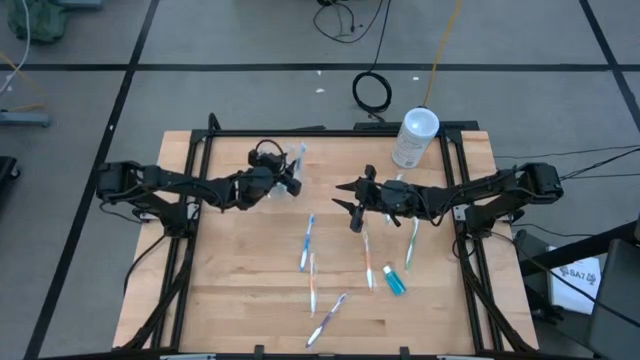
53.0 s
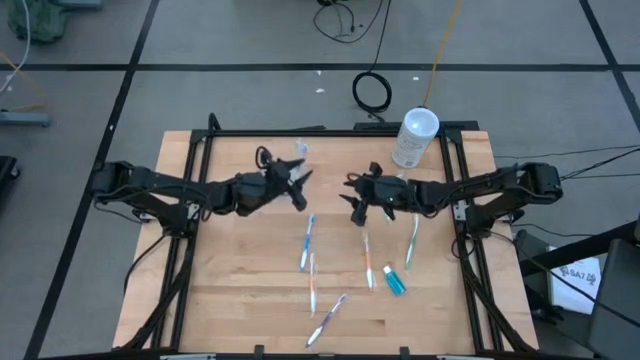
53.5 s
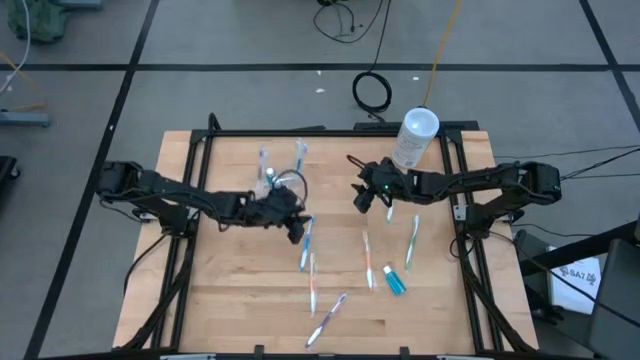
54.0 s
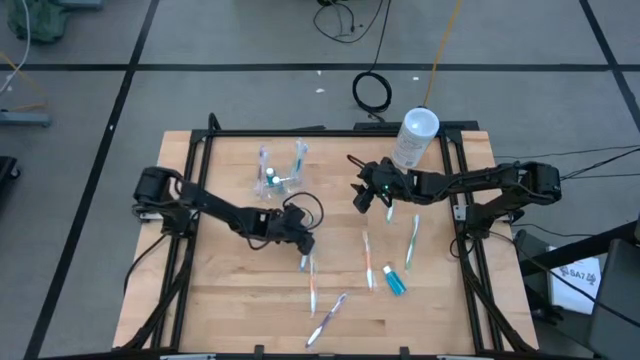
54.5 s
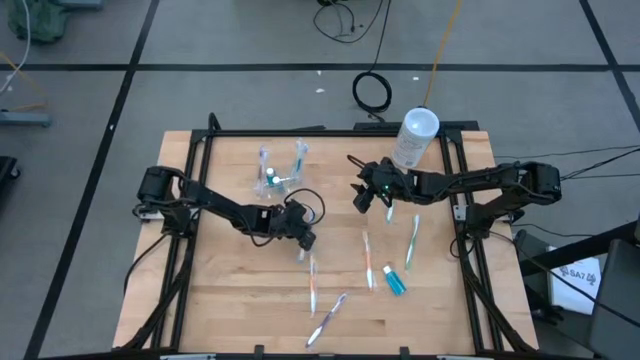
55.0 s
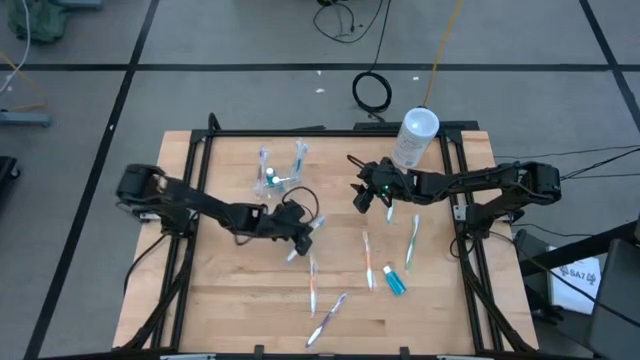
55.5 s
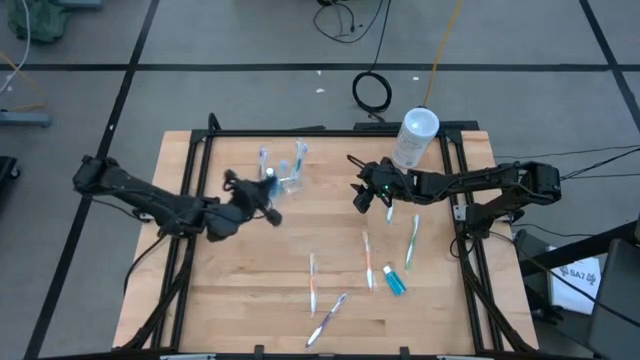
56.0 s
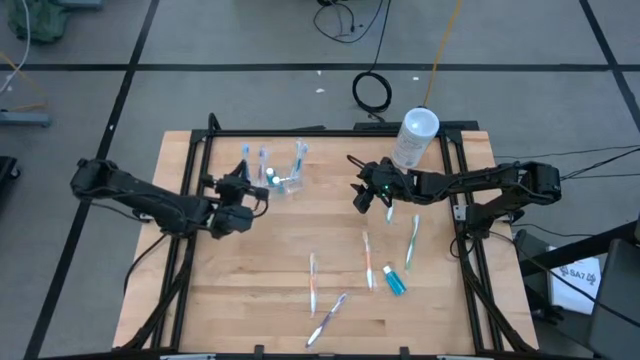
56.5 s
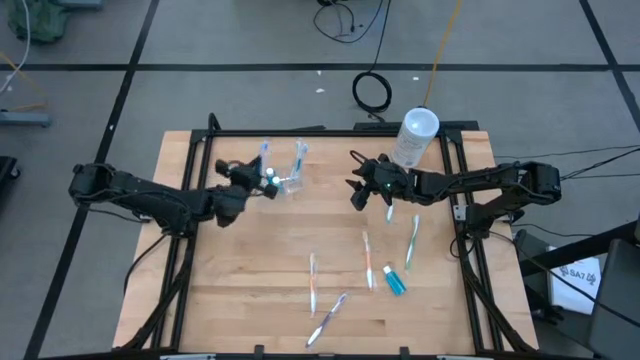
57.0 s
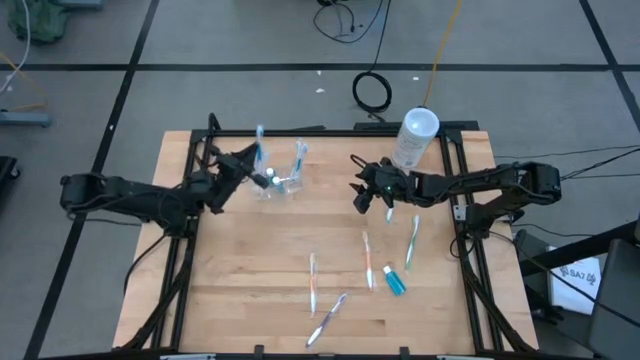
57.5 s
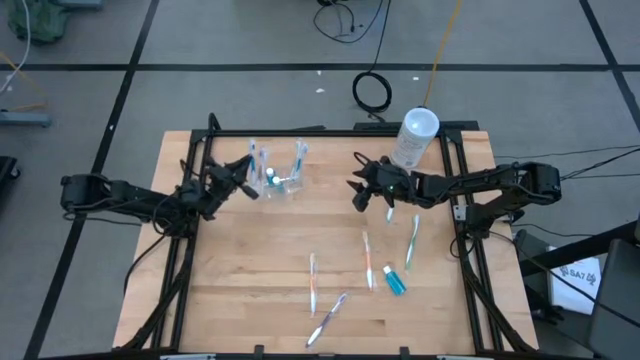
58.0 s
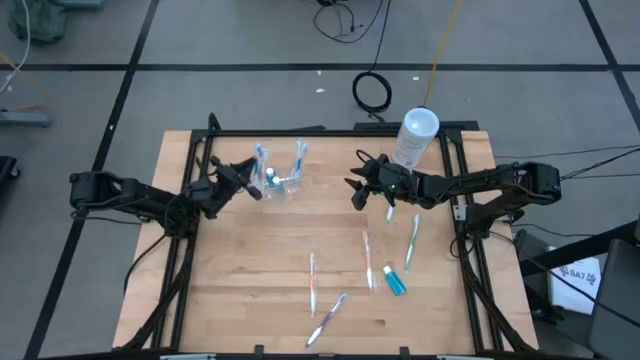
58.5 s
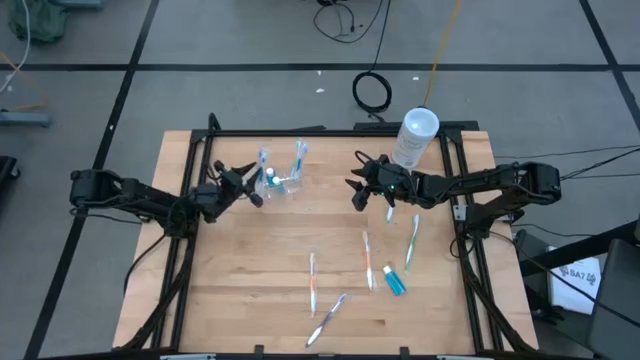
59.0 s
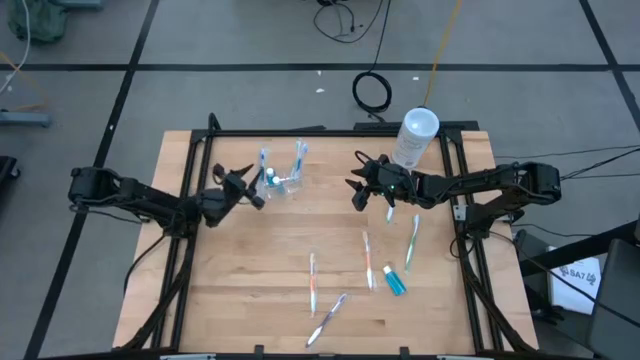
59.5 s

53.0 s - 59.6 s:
Task: Pick & Place toothbrushing station
Put the blue toothbrush into the left compartment of the transparent organizer

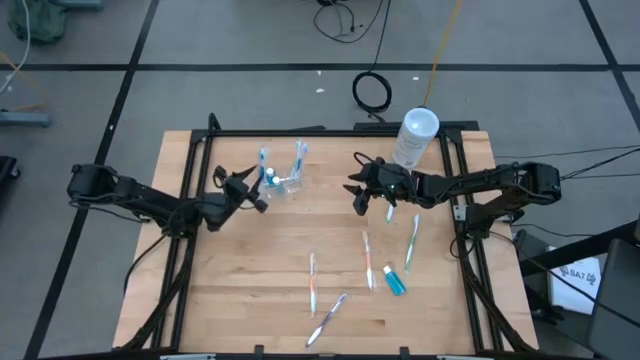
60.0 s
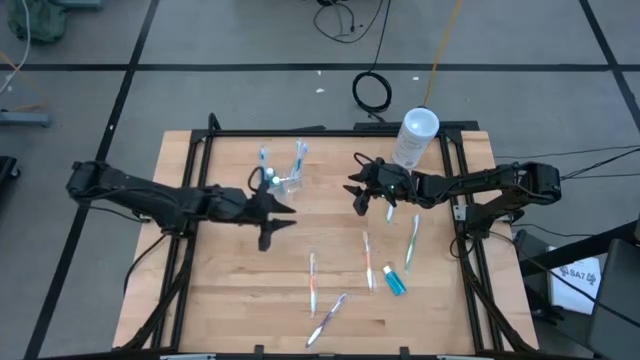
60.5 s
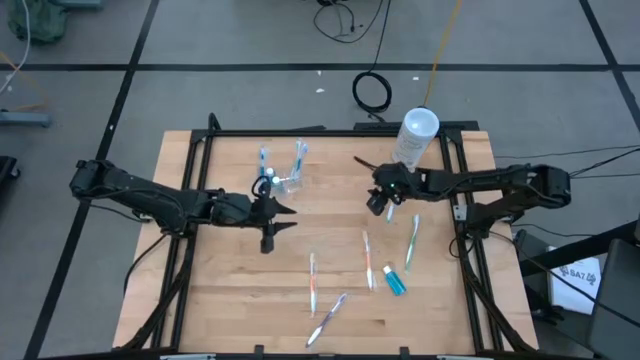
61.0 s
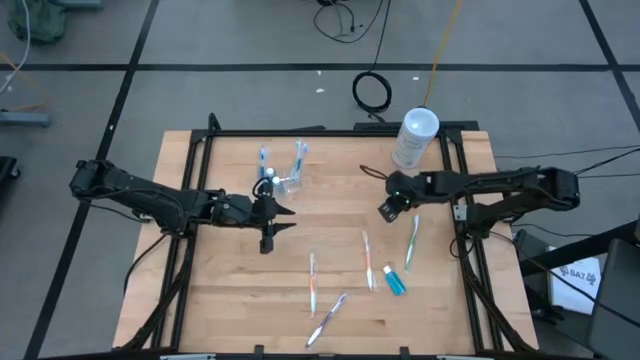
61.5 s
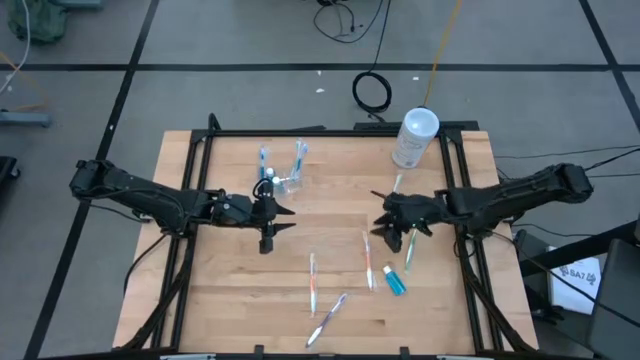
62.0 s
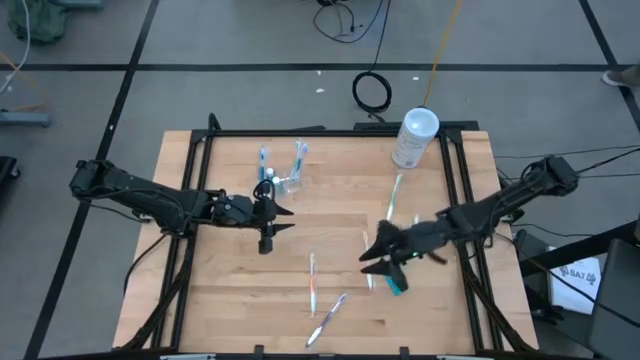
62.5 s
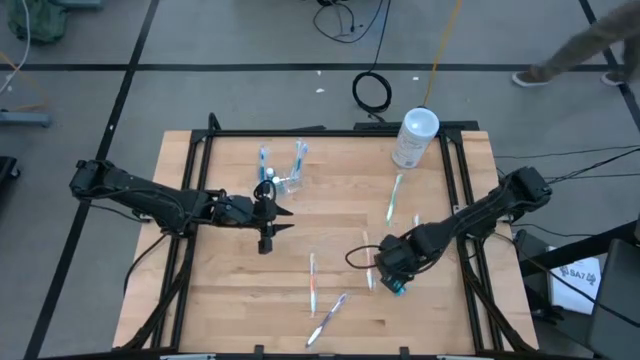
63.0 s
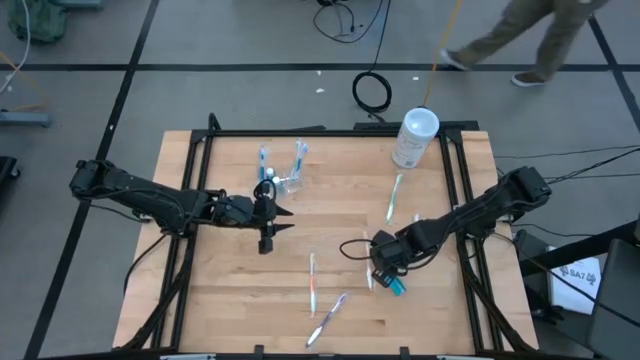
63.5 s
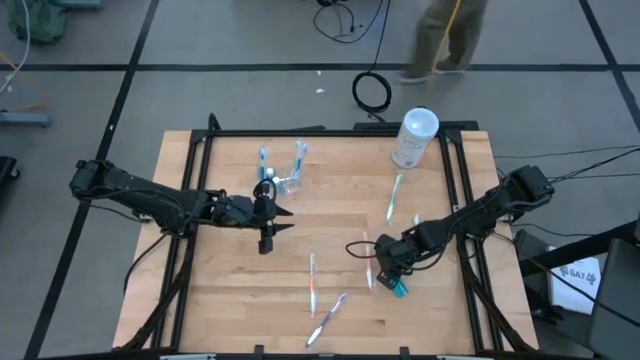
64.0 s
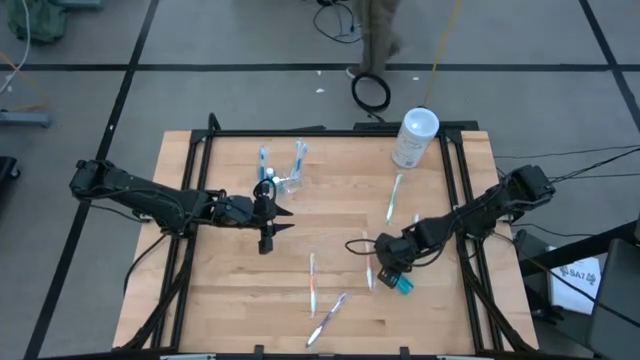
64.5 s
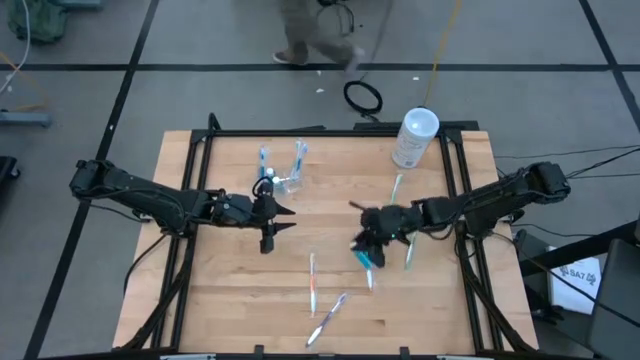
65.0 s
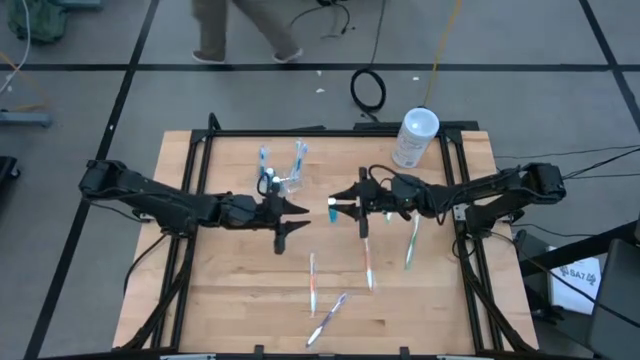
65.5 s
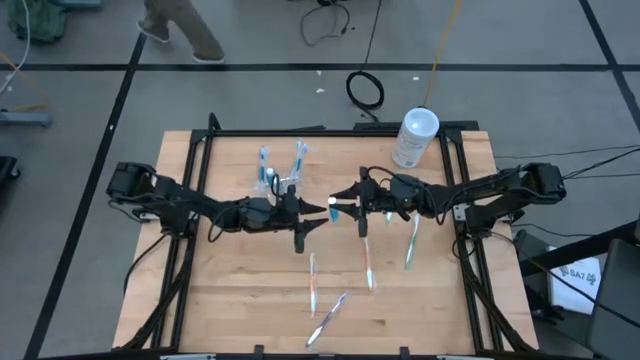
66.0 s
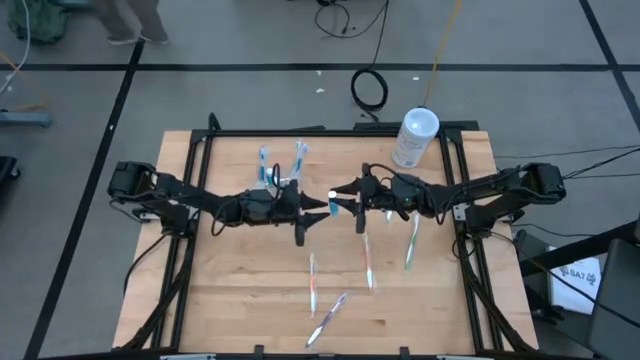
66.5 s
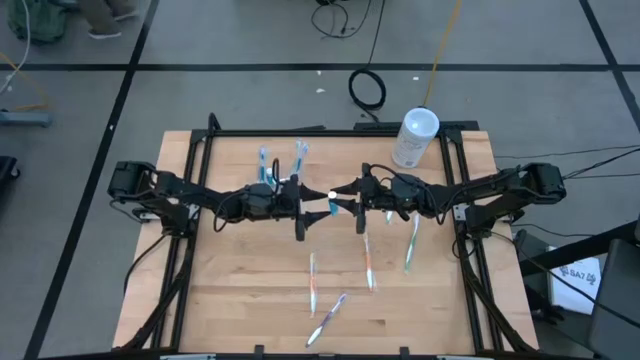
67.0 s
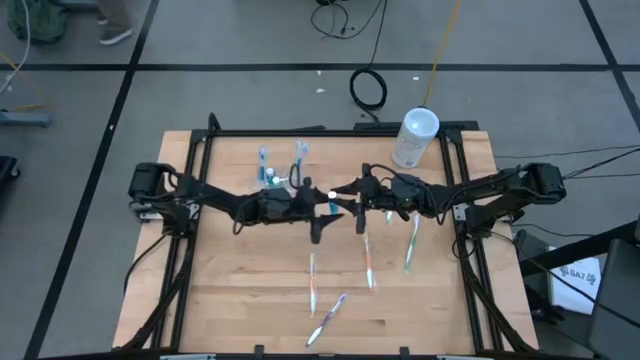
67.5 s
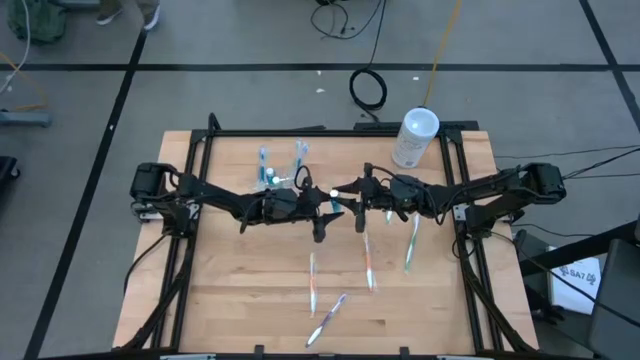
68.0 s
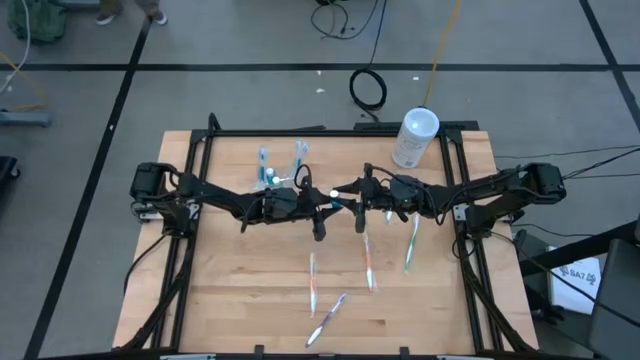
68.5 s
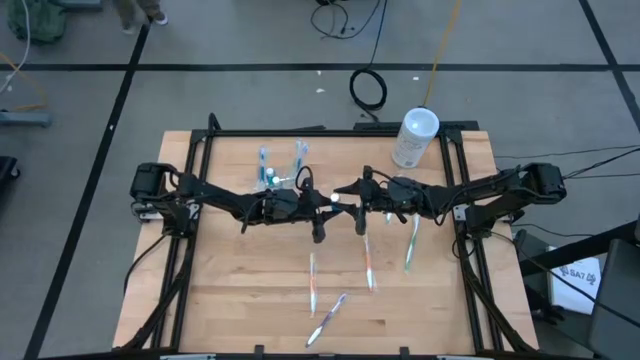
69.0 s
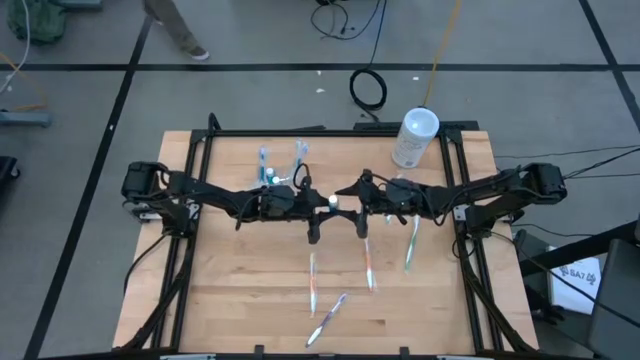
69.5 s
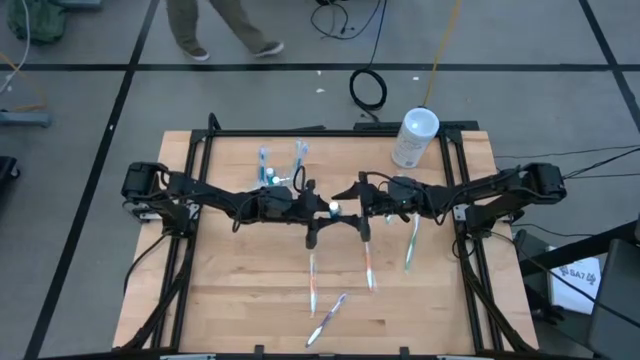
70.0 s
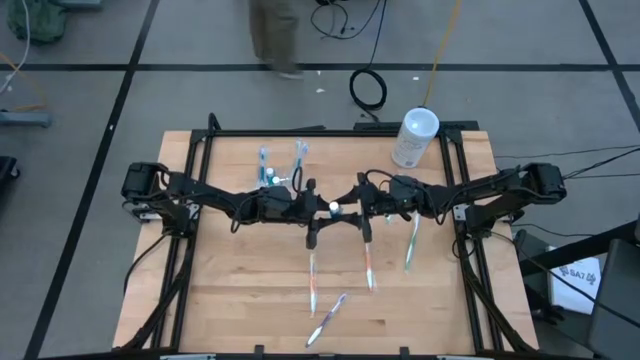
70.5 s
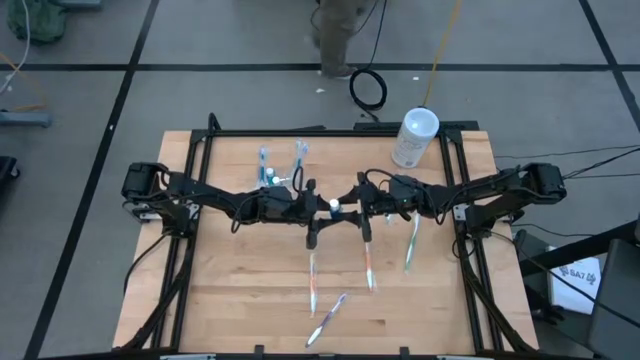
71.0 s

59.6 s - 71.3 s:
Put the blue mouthwash into the transparent organizer

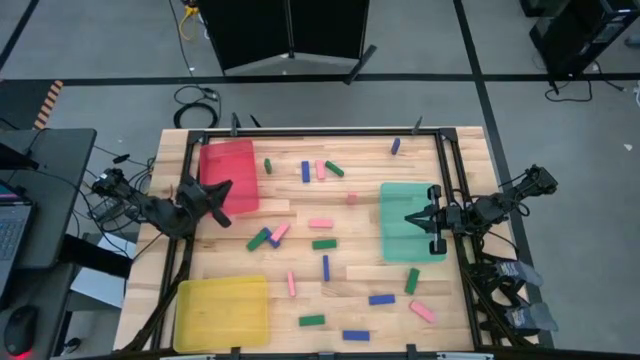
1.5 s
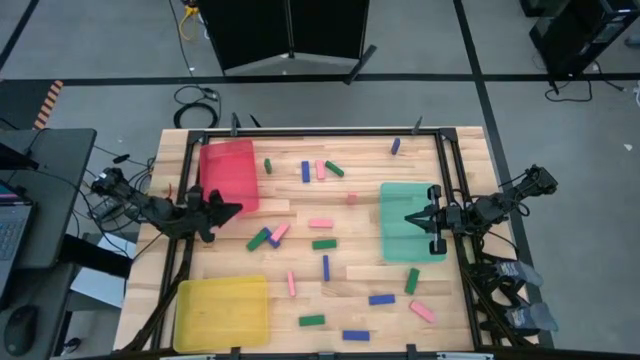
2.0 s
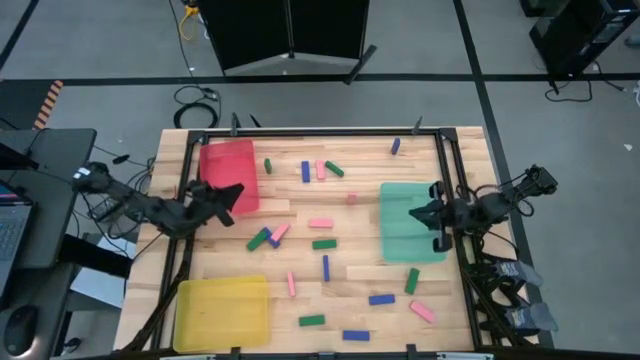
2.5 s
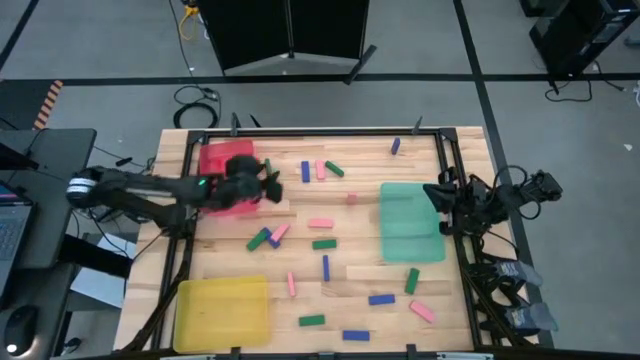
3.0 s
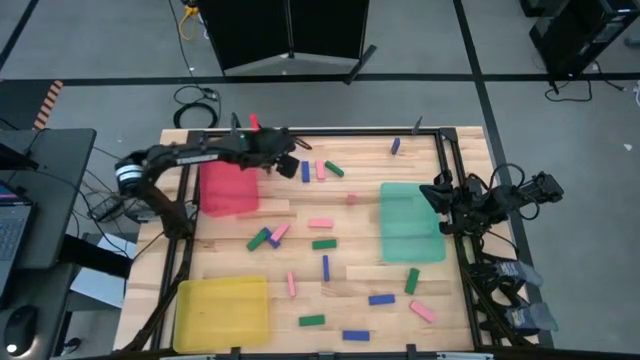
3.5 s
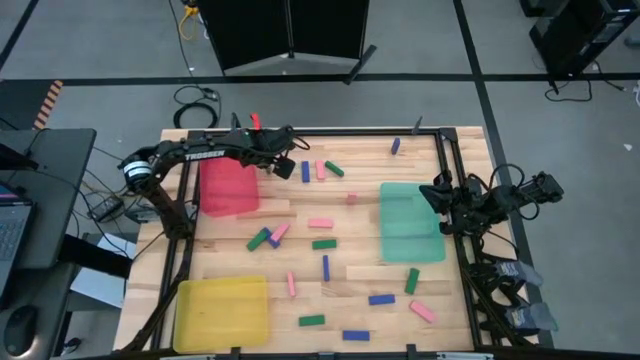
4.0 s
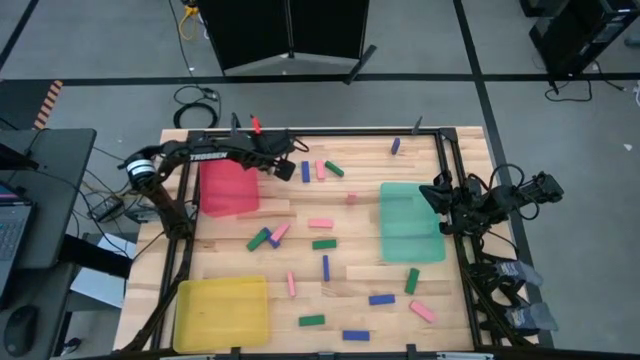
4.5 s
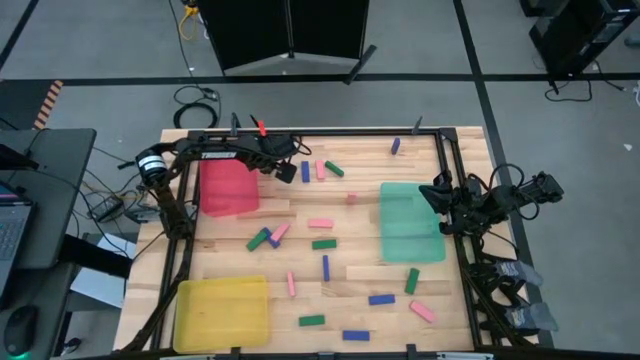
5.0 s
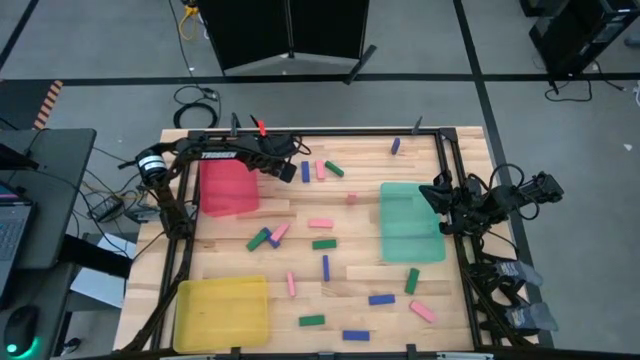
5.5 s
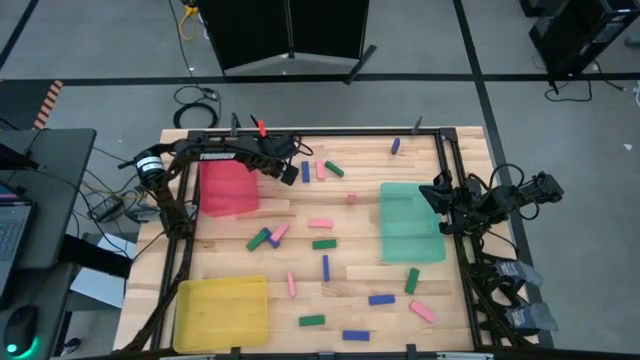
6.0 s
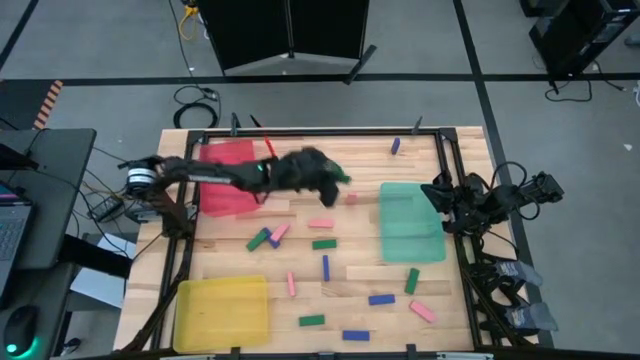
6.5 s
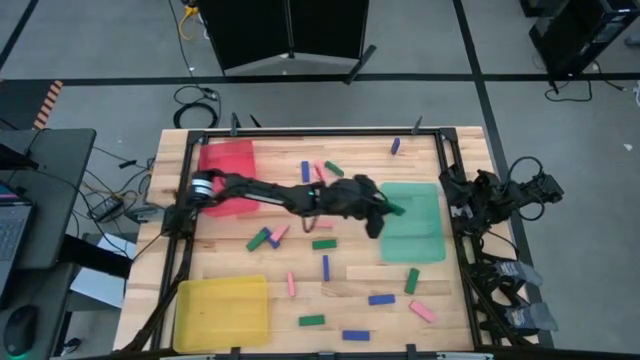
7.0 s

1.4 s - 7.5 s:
Task: Sort blocks
Put the green block into the blue bin
